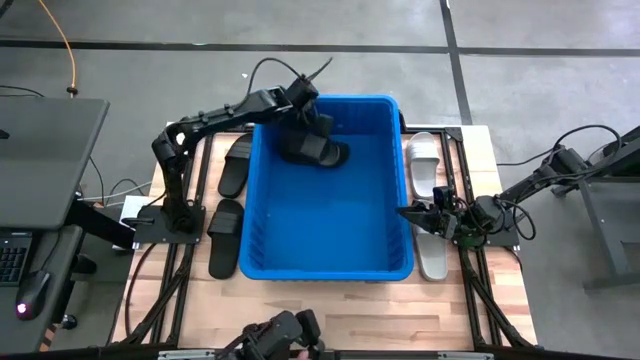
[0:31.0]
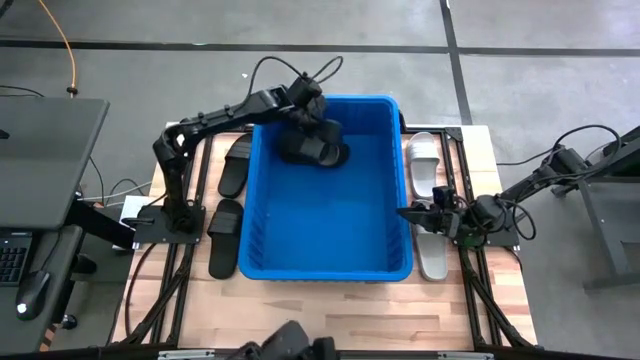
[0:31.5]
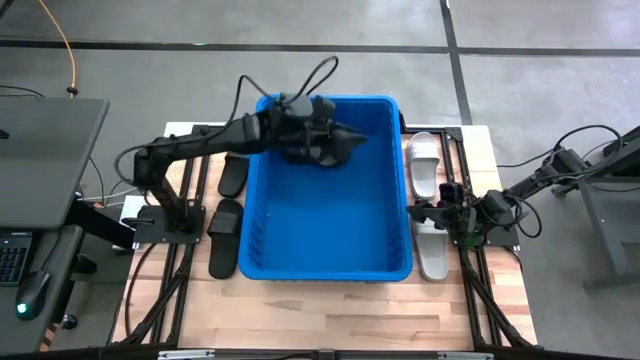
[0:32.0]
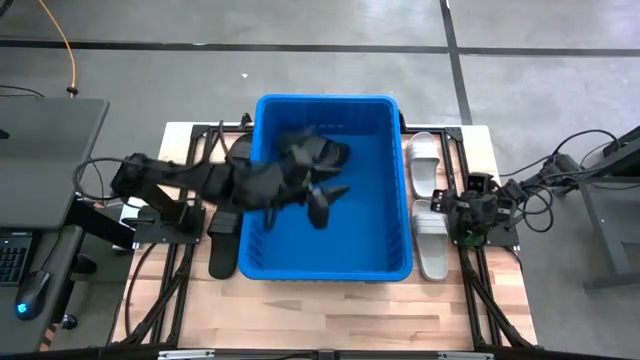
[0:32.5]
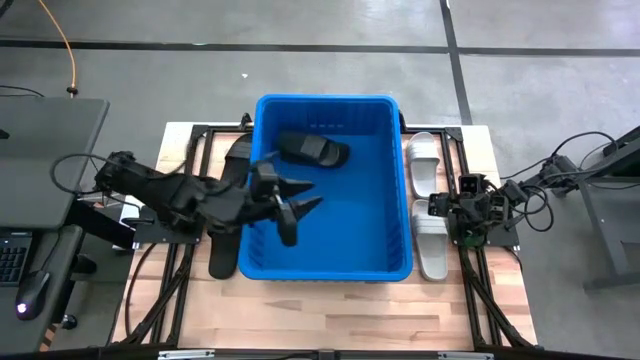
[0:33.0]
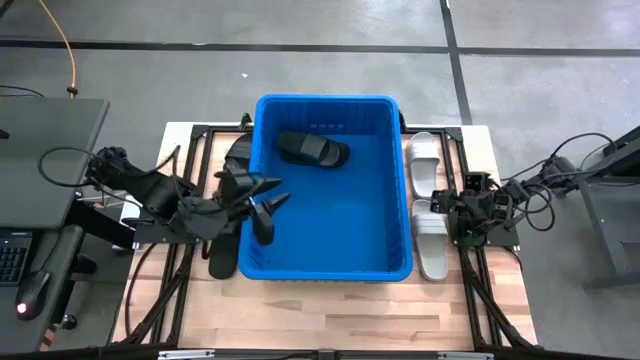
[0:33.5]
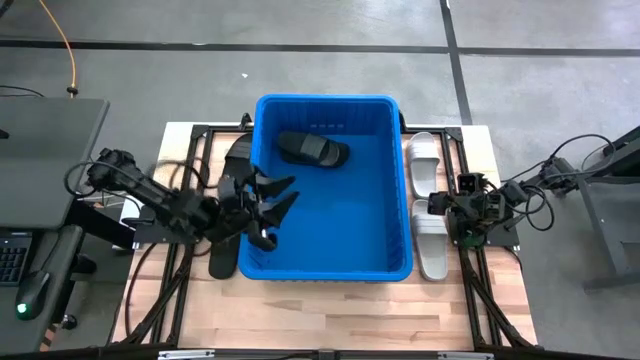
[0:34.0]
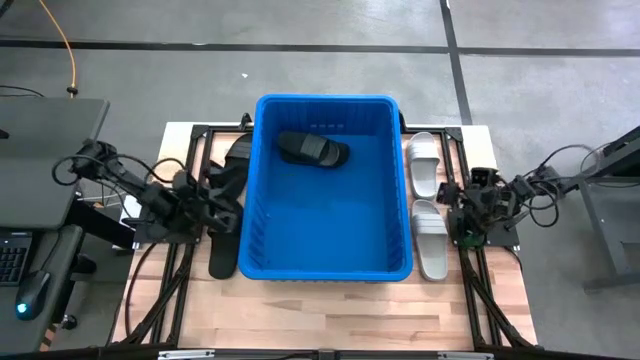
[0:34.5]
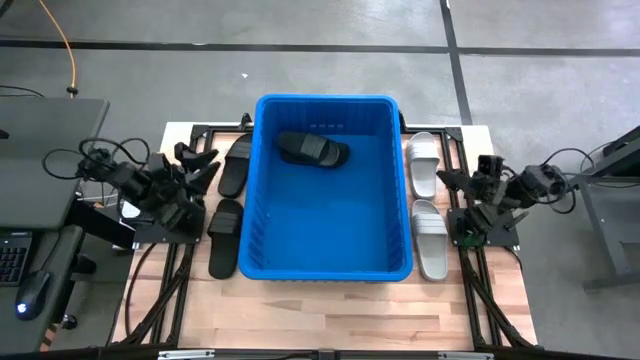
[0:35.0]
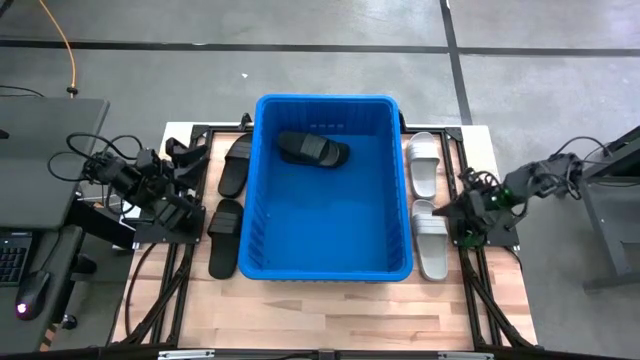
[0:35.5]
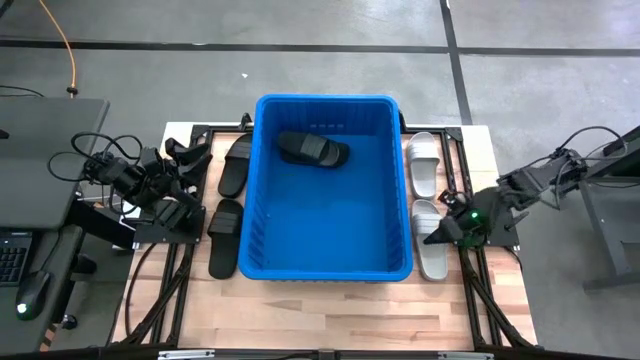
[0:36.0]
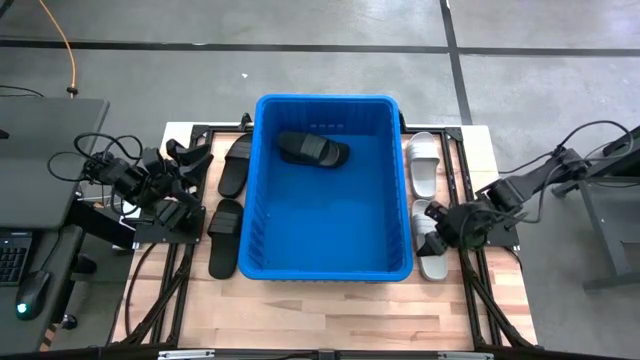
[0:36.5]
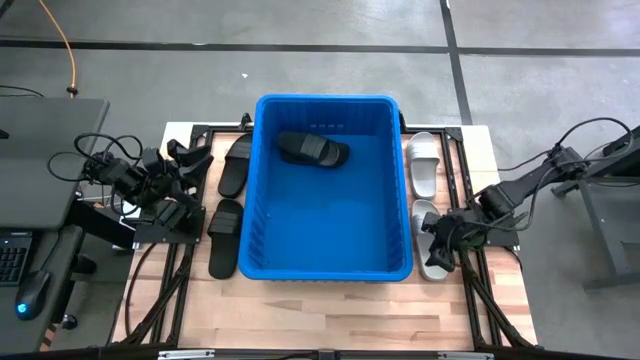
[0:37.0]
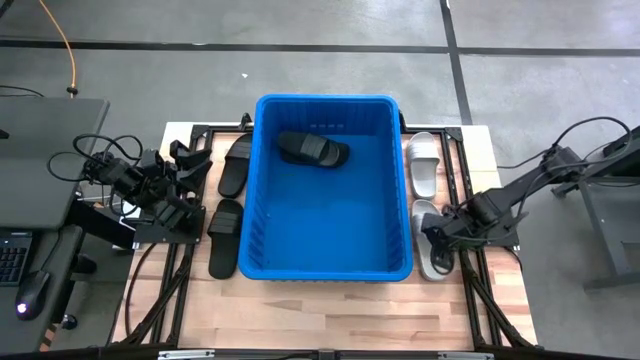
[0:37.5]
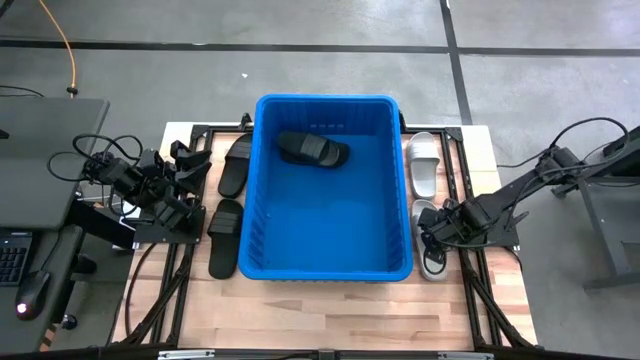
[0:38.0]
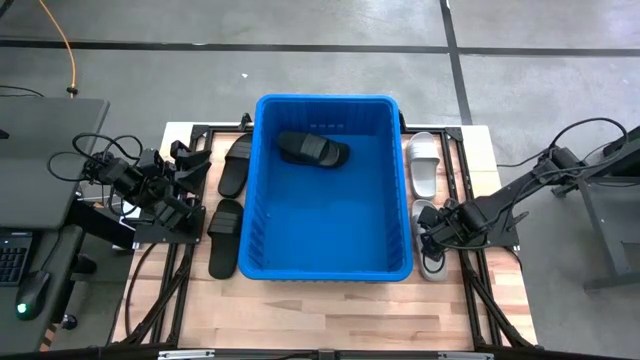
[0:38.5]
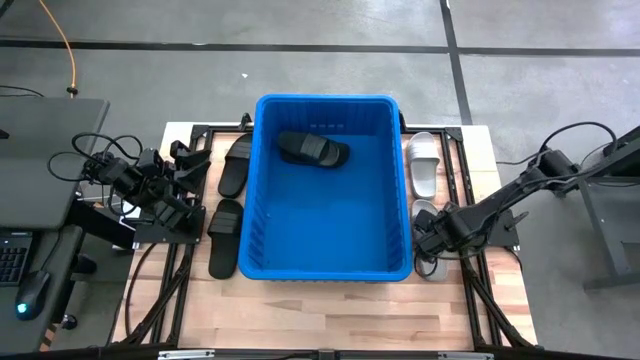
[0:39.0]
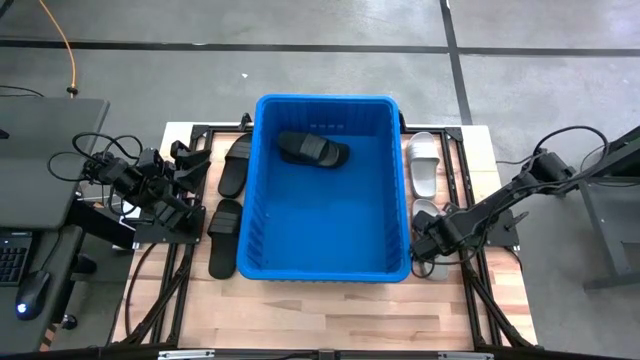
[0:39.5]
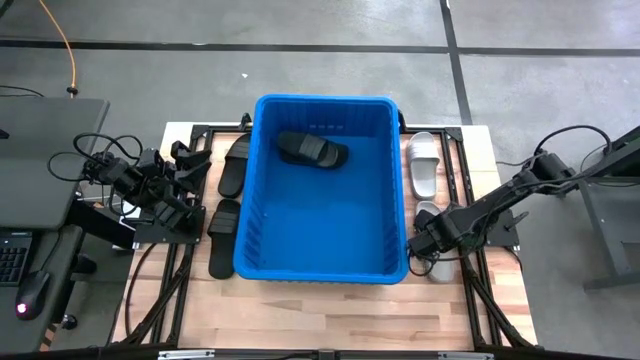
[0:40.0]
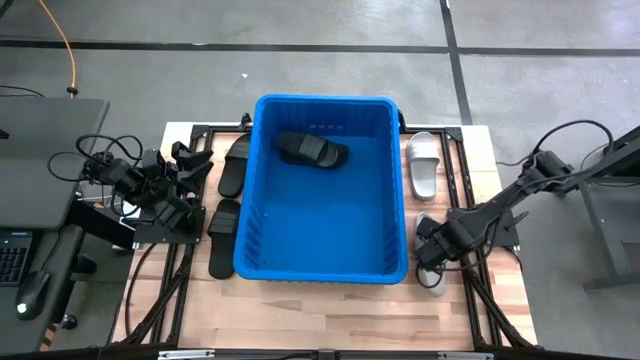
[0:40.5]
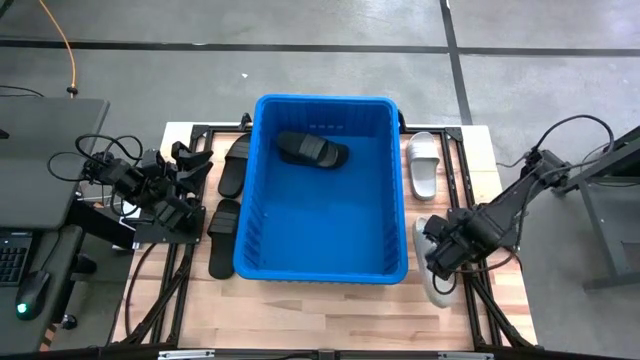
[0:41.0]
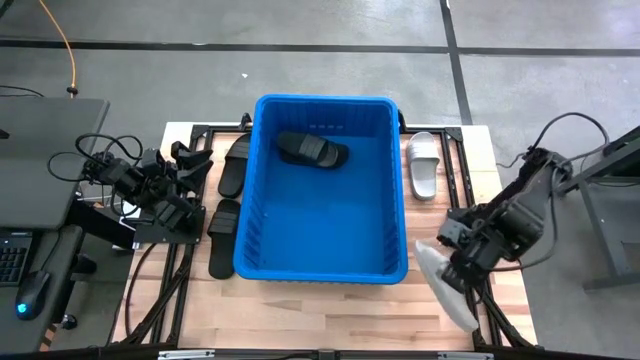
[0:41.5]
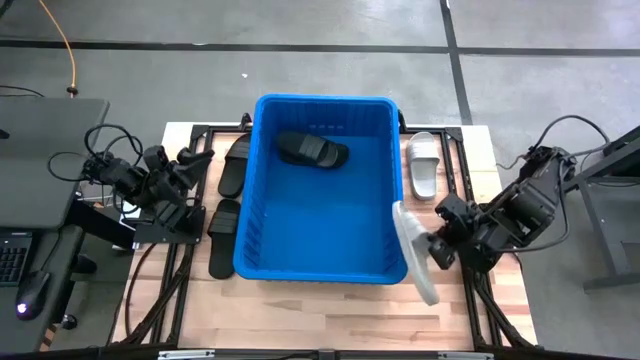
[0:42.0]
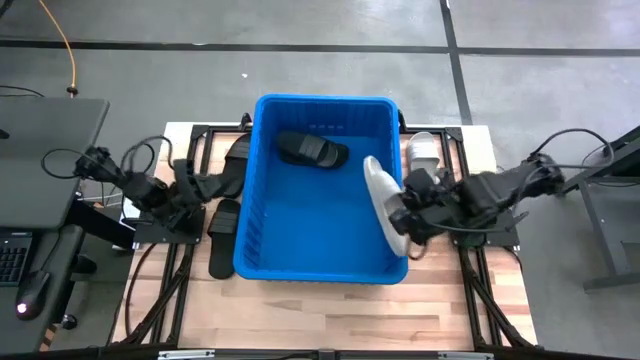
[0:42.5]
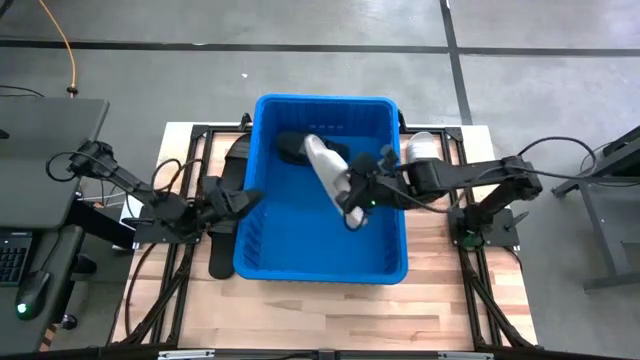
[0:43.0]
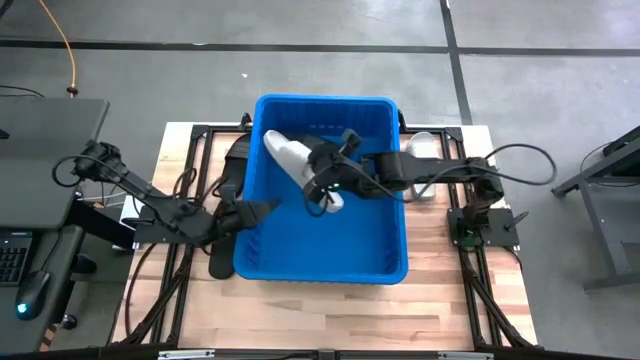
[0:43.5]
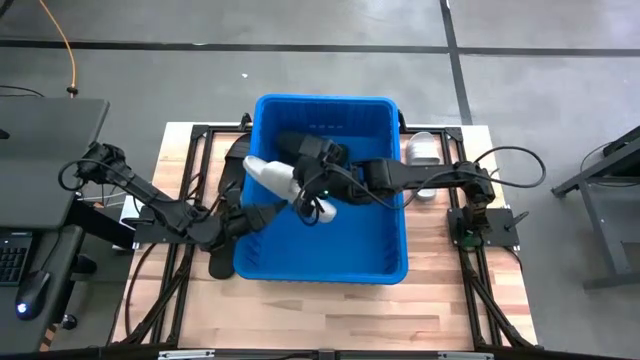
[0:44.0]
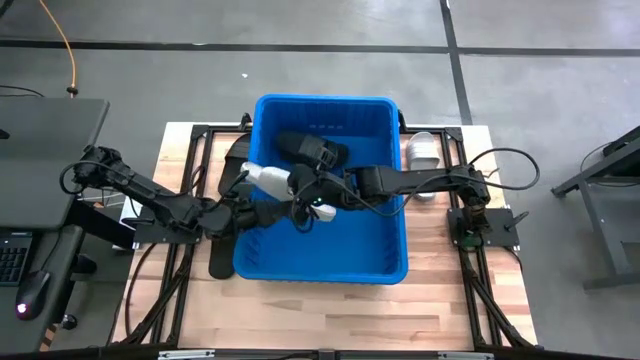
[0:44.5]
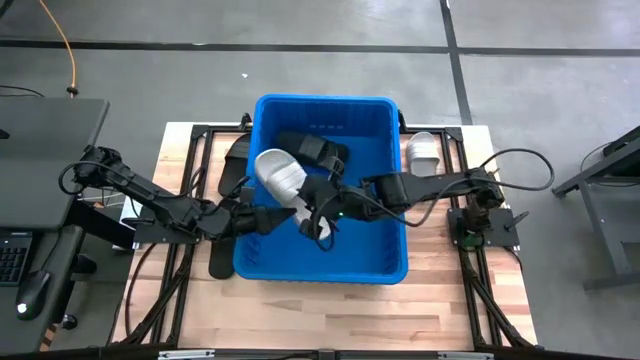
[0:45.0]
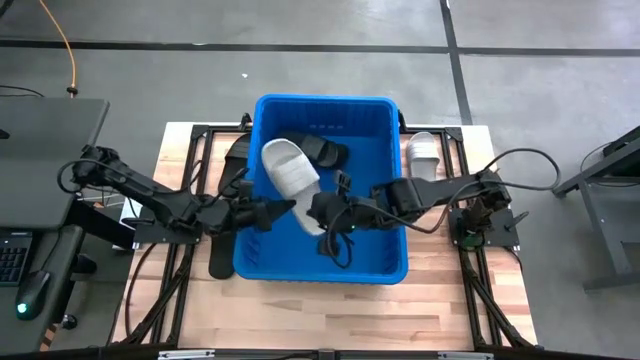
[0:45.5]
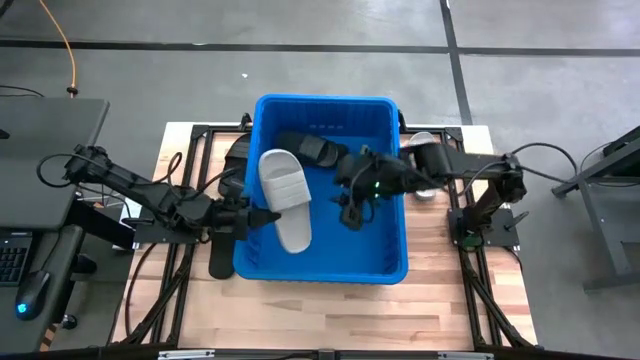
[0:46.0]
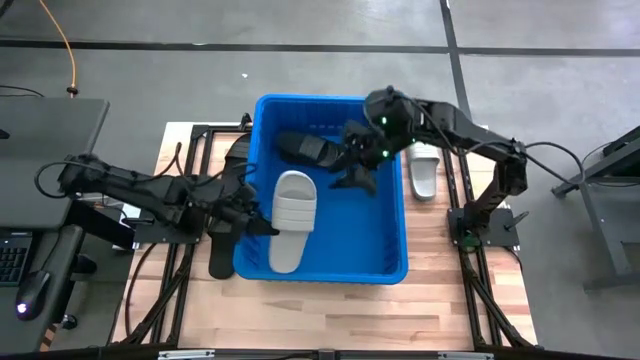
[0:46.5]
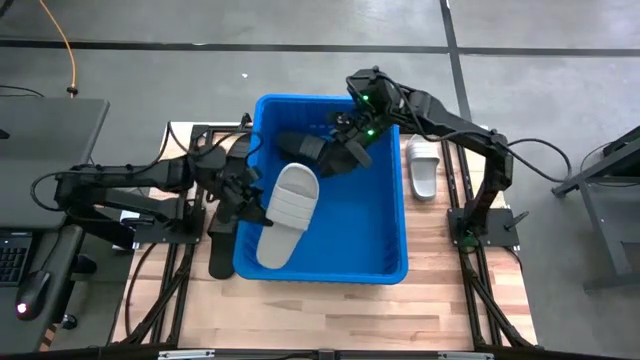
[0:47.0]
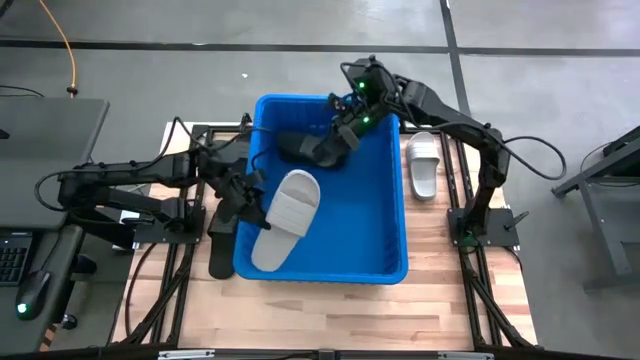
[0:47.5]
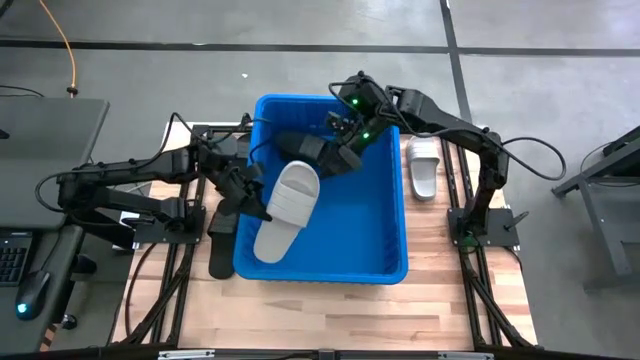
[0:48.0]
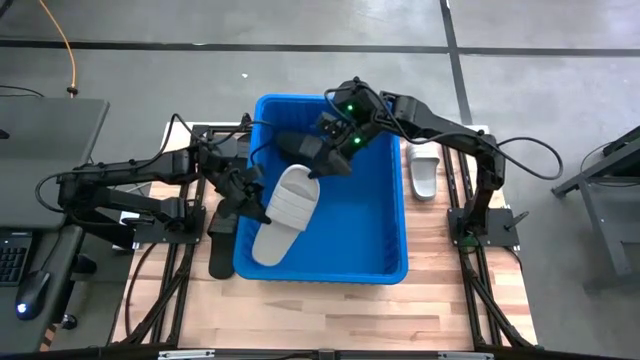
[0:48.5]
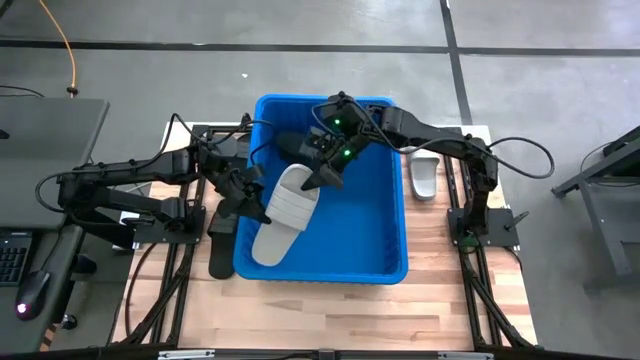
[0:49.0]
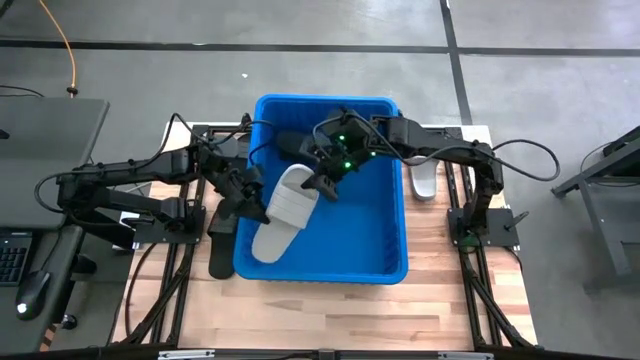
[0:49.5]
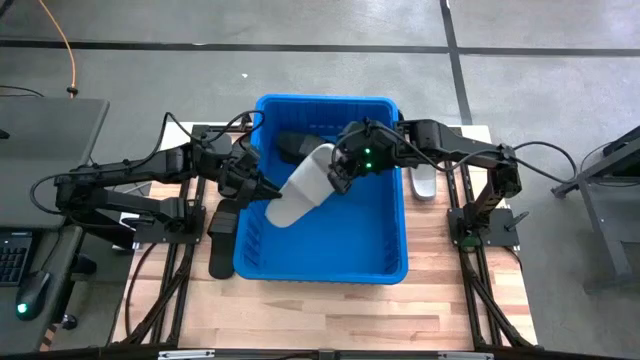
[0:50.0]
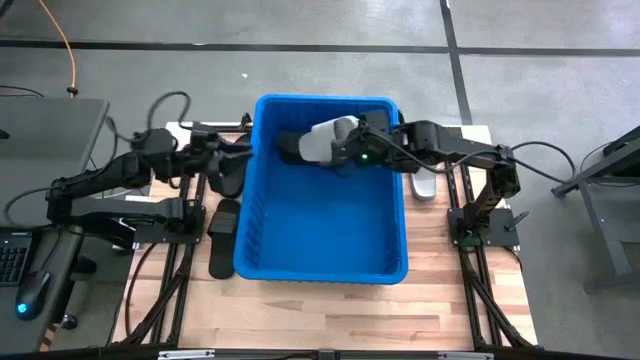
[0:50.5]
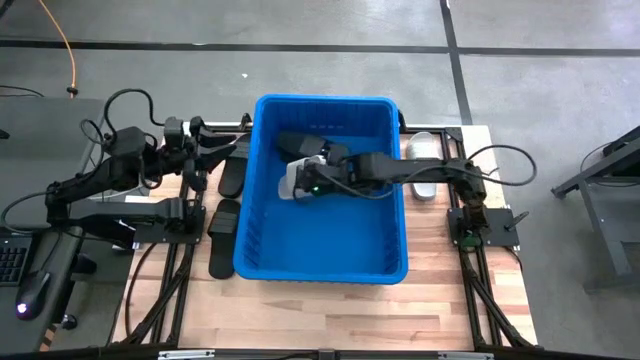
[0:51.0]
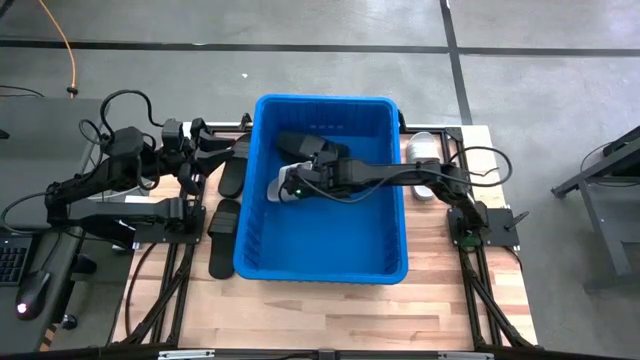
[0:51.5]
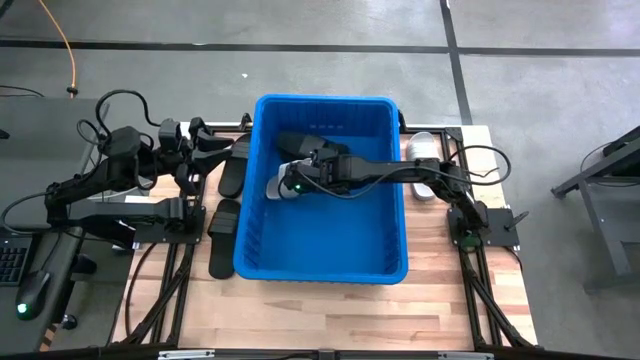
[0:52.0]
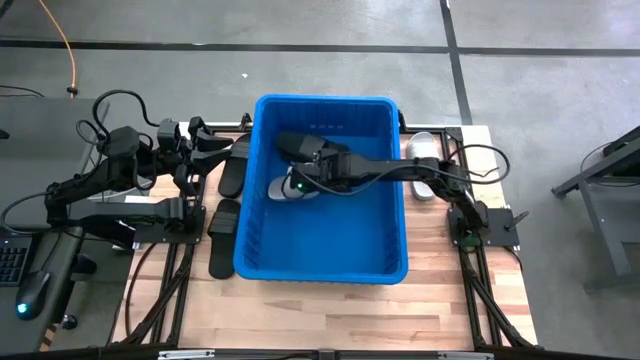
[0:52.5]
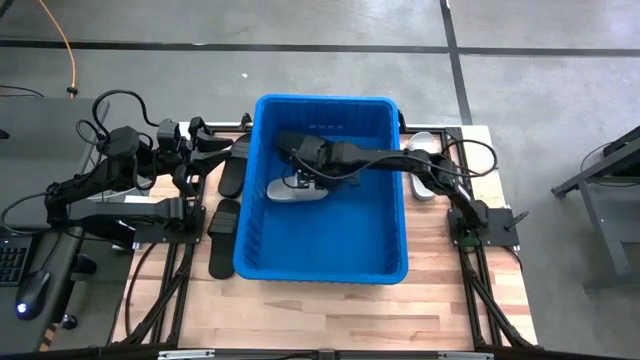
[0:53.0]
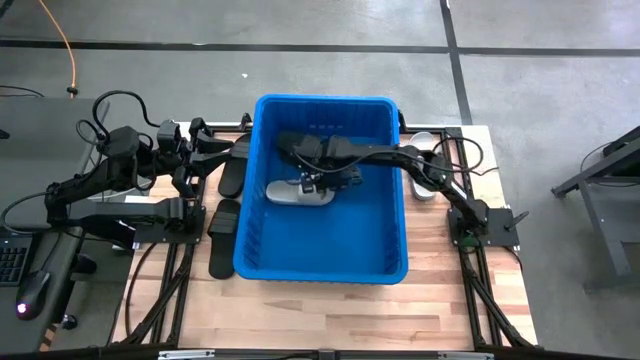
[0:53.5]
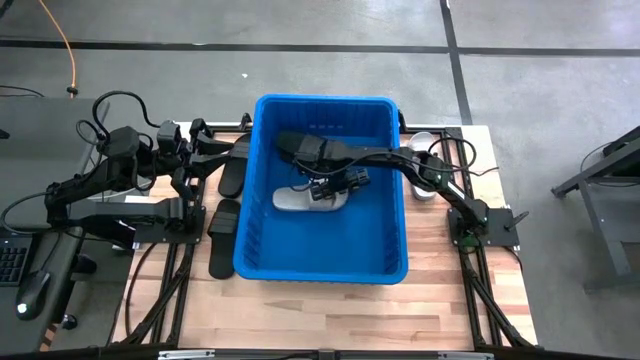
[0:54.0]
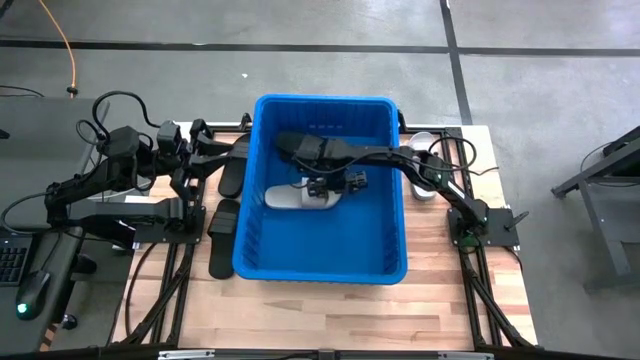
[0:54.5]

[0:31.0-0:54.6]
Task: Pick and place slides into bin
Put the white slide into the blue container
